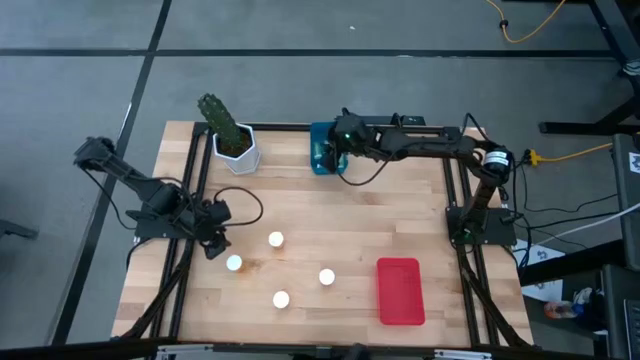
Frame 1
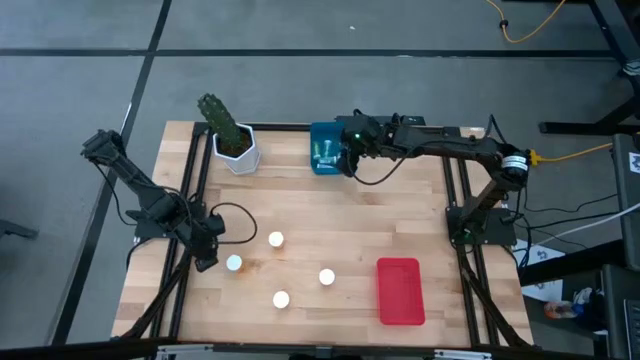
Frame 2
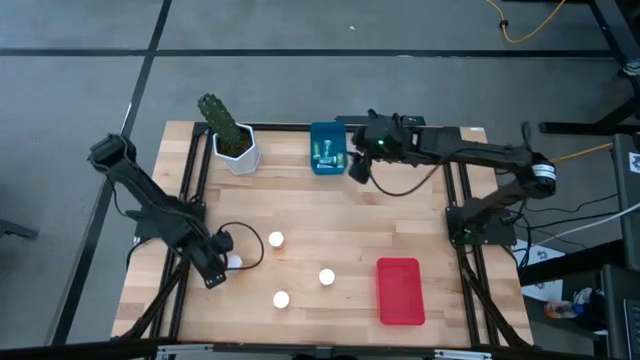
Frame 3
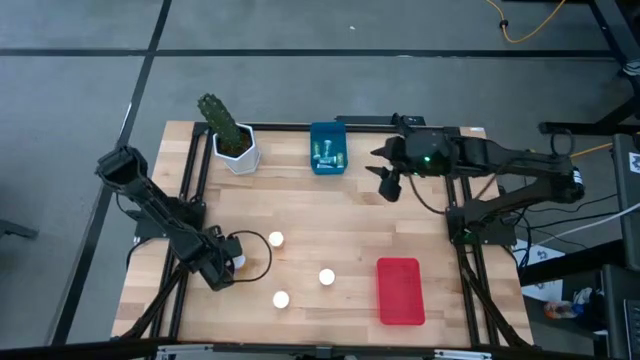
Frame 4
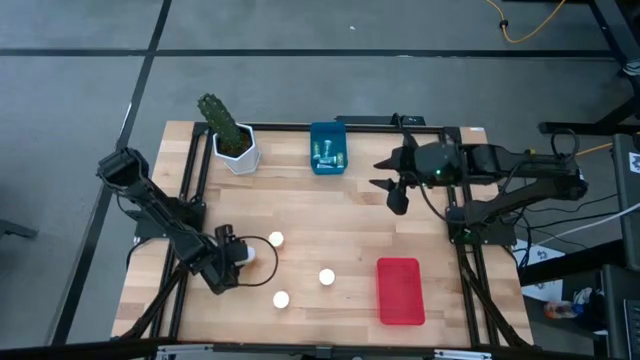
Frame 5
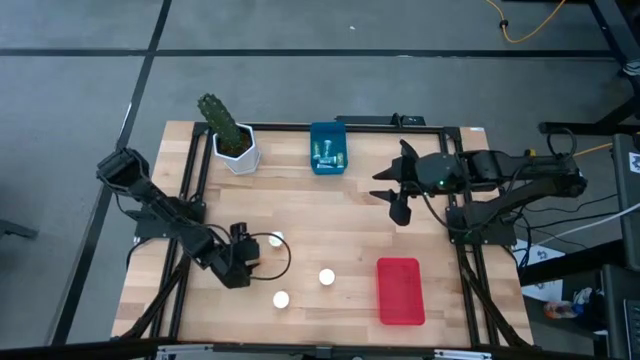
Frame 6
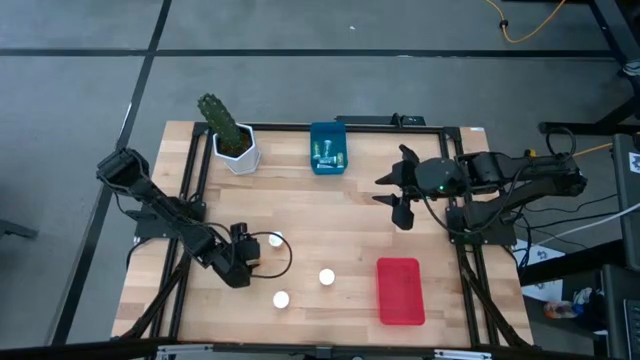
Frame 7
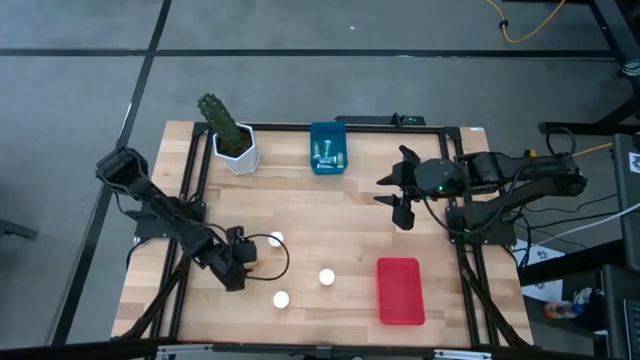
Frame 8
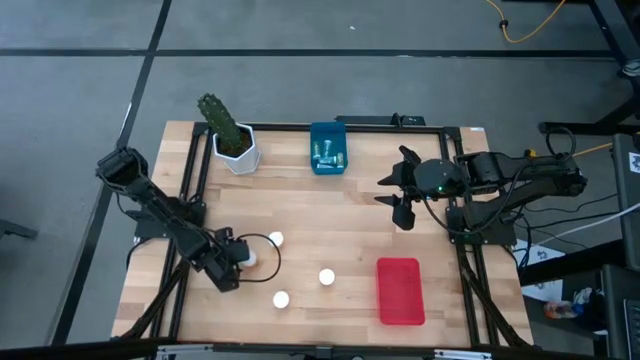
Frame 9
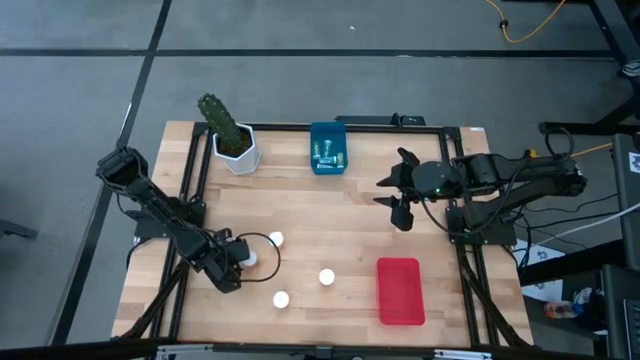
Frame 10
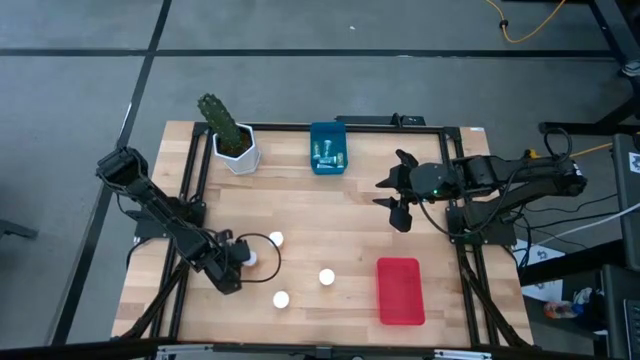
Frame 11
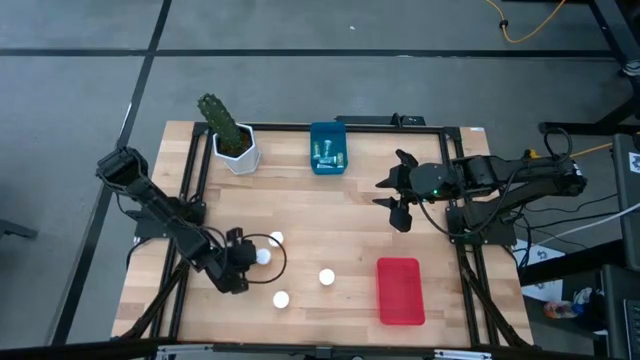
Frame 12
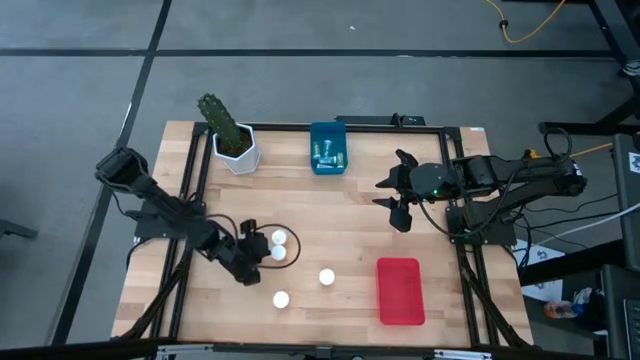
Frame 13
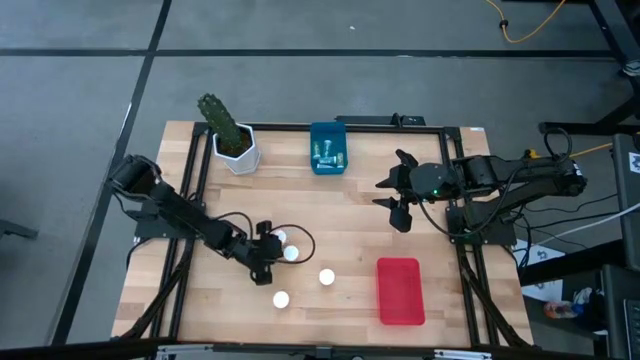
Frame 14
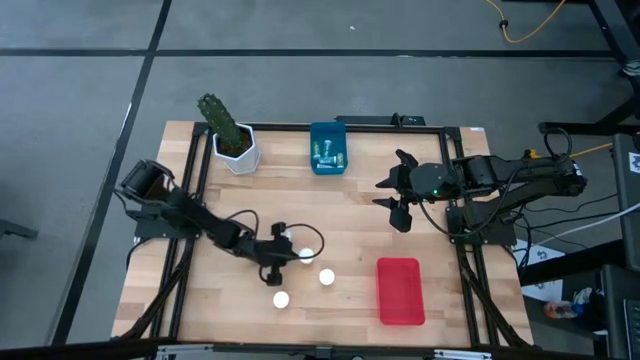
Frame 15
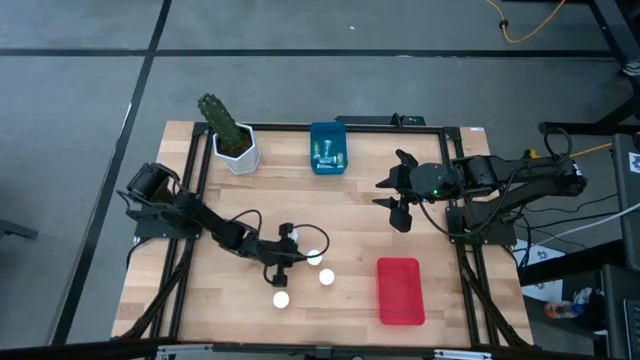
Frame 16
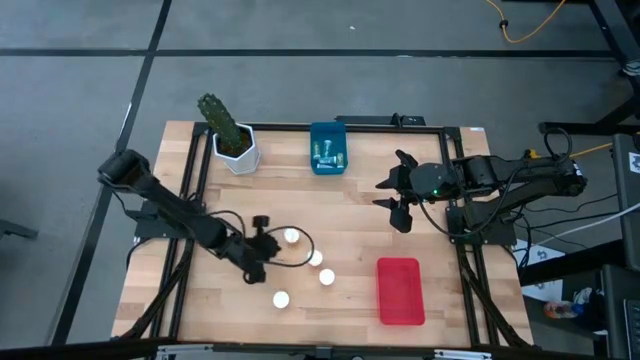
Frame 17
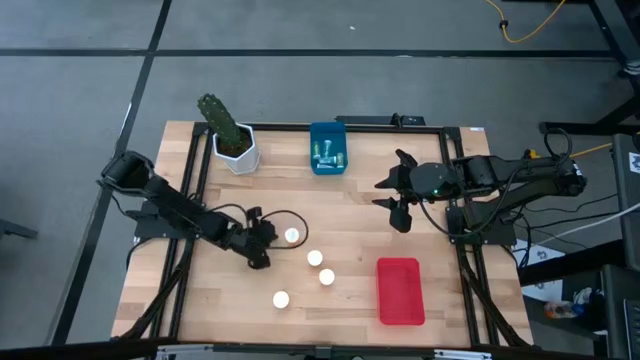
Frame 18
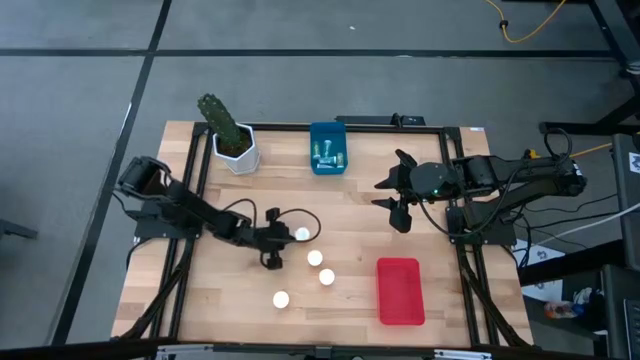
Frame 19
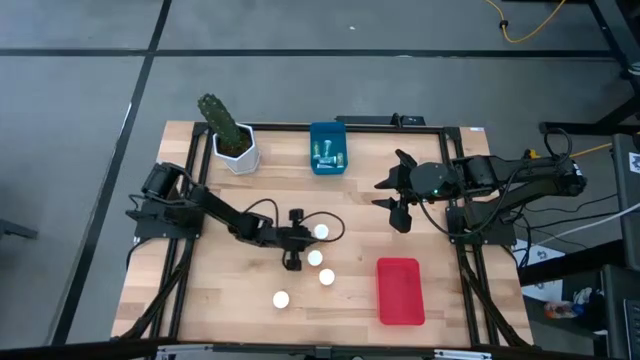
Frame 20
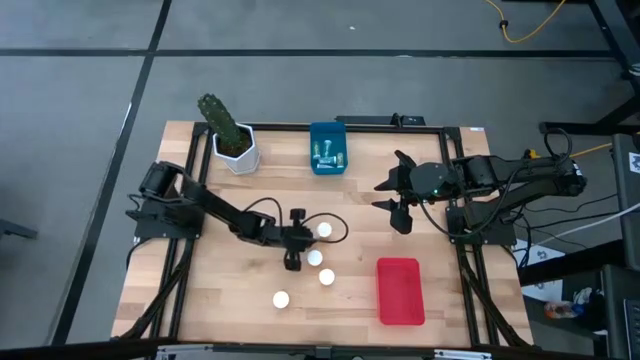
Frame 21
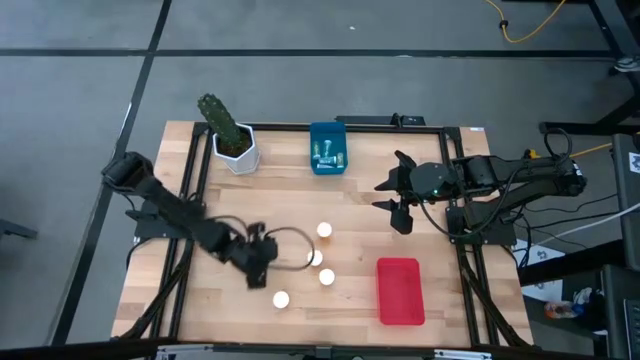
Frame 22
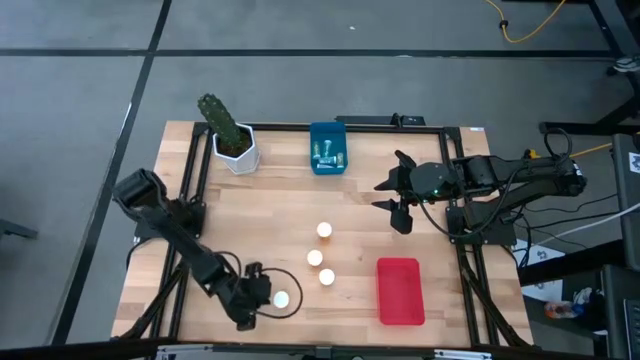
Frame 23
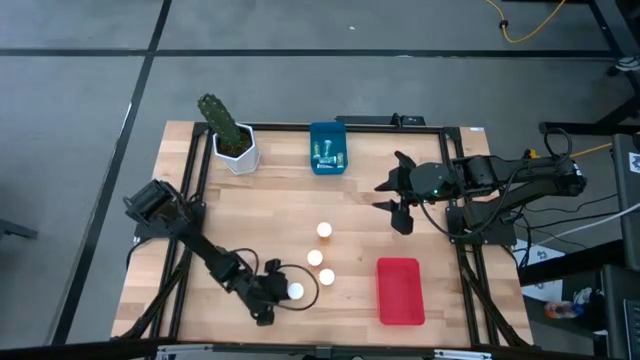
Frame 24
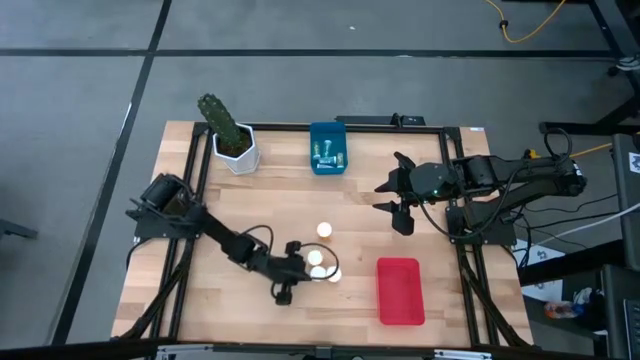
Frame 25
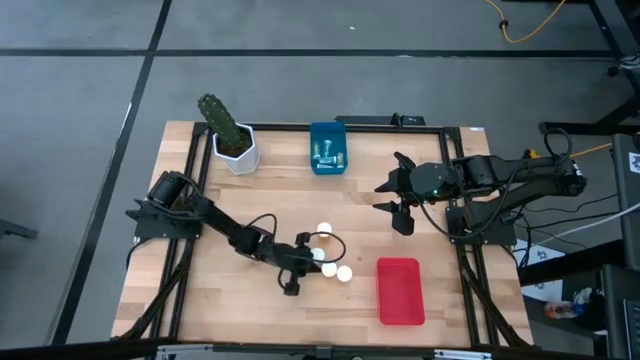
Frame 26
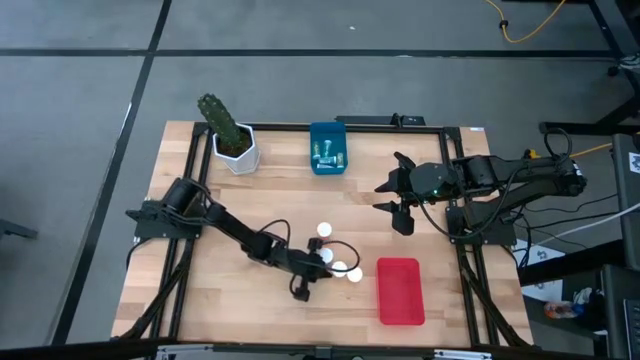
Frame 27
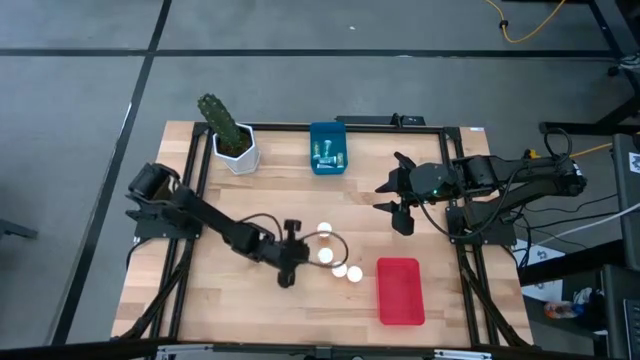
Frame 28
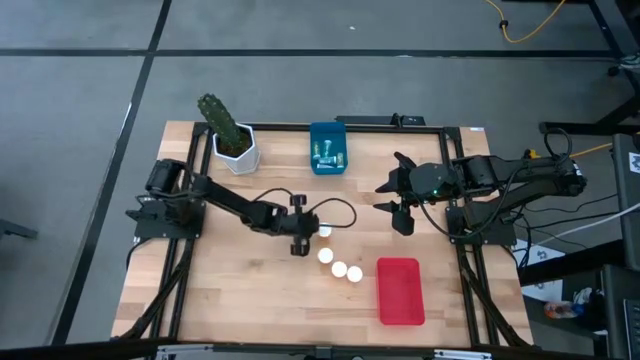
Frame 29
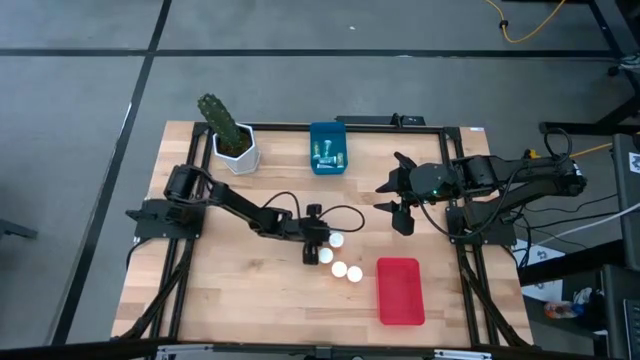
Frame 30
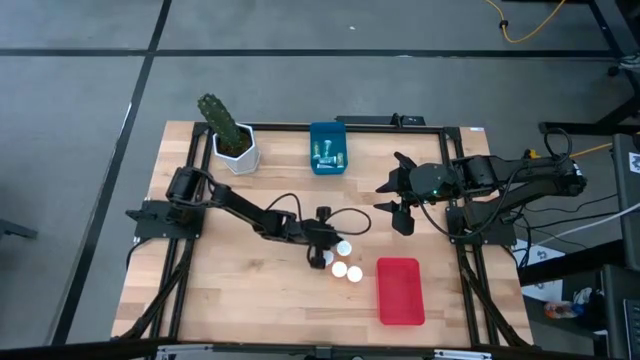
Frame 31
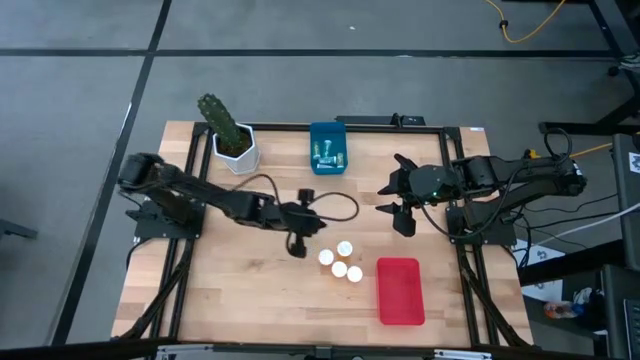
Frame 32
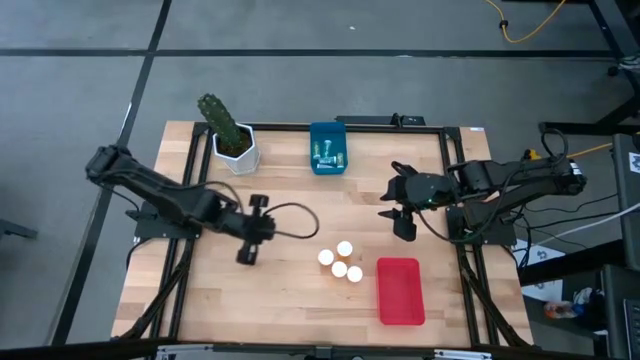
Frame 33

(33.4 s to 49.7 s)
Task: Pick and place medicine bottles into bin by pill shape (circle, oval)
Adjust the large orange pill bottles

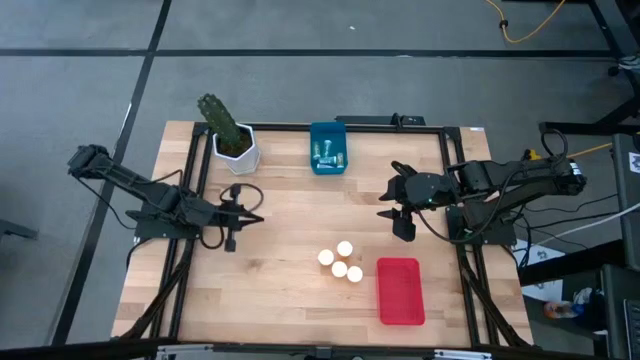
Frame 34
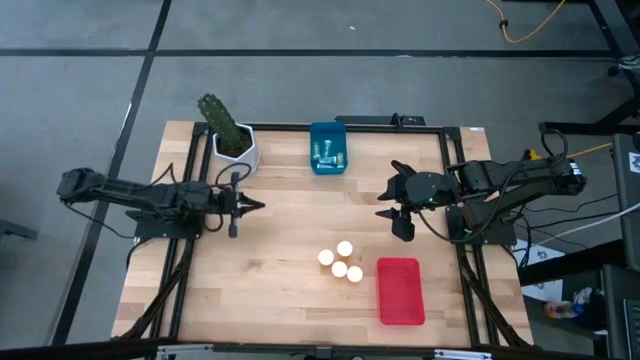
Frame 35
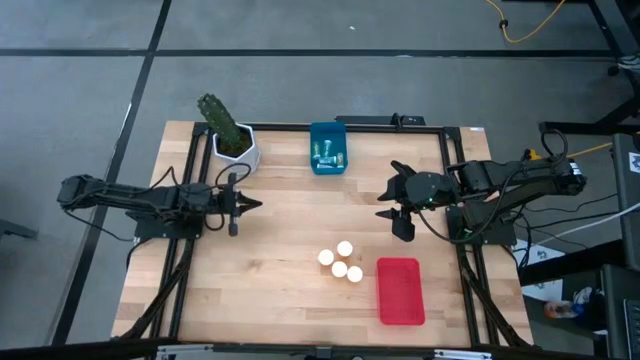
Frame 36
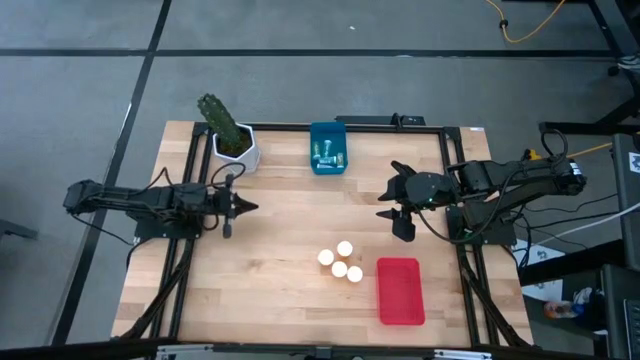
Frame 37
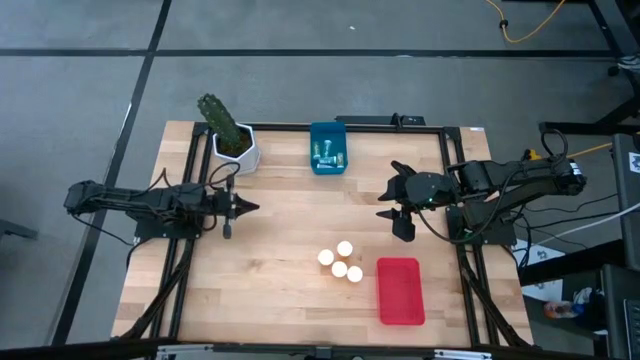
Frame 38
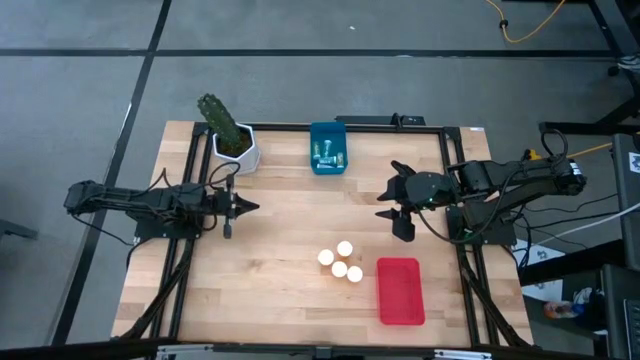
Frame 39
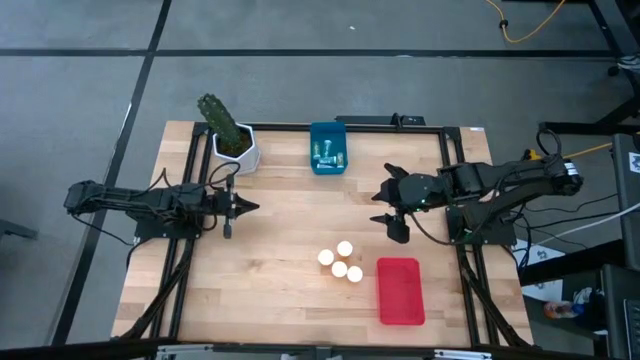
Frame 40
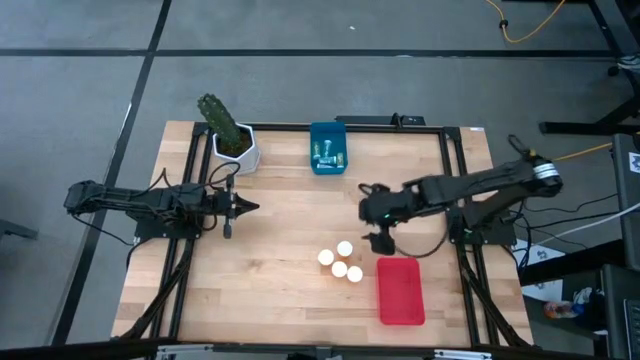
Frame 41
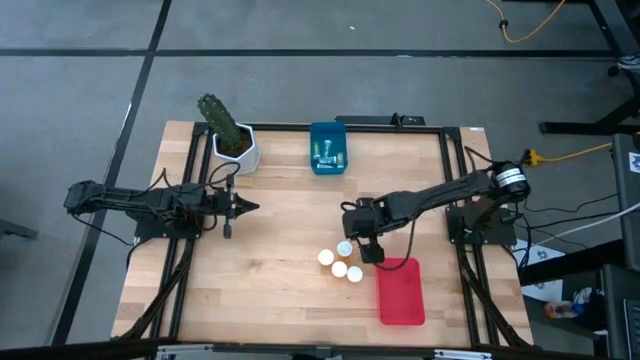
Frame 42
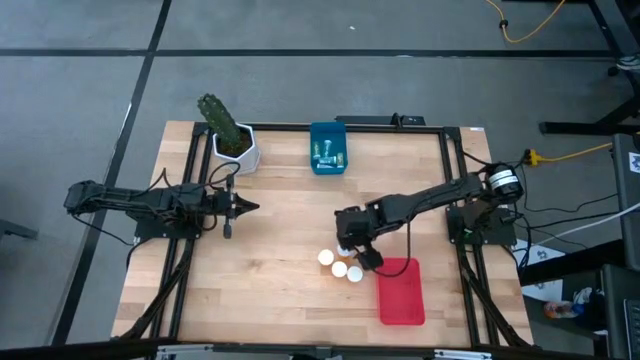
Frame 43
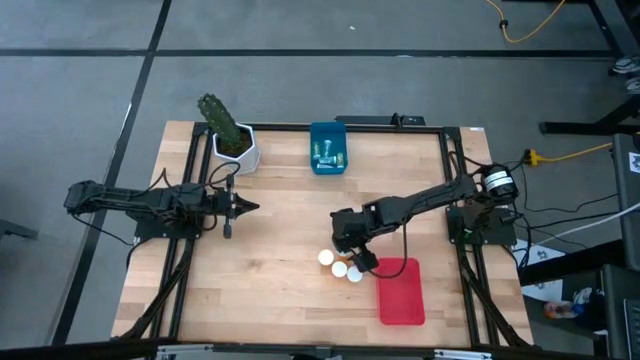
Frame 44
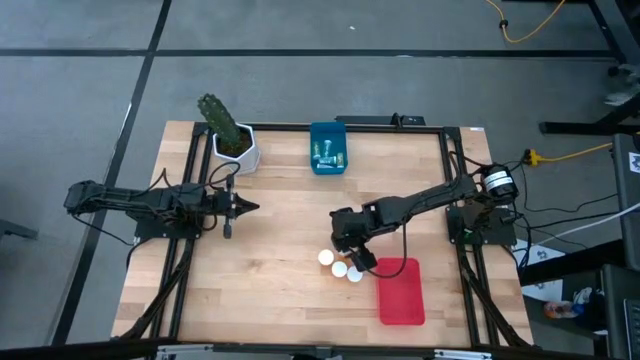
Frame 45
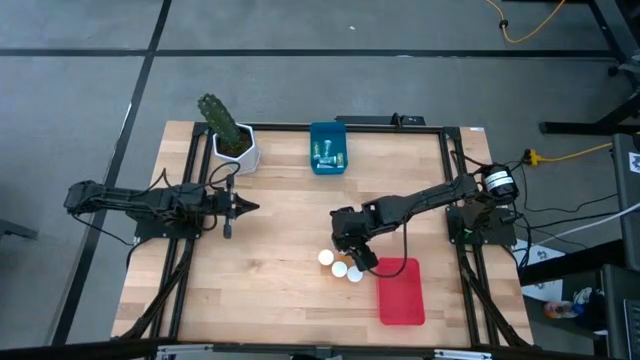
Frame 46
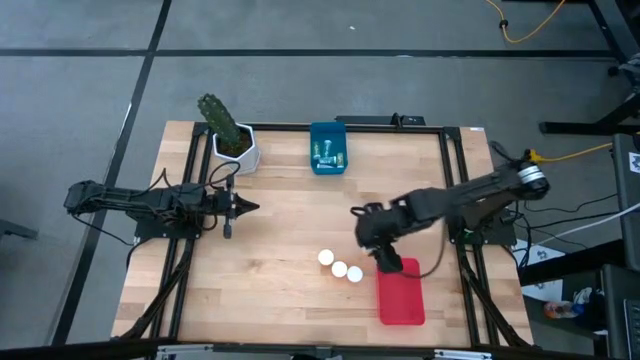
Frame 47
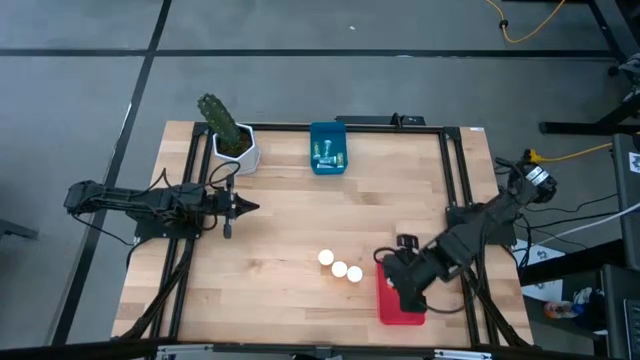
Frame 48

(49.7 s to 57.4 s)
Put the large orange pill bottle into the red bin
